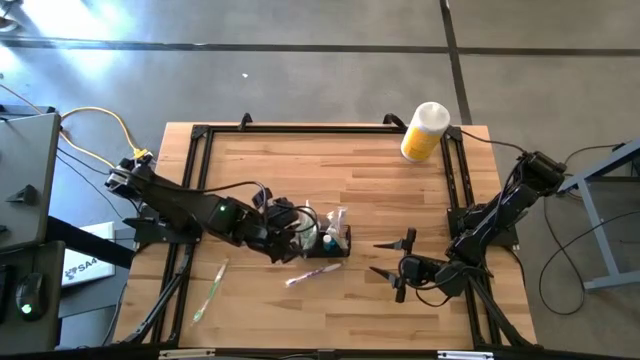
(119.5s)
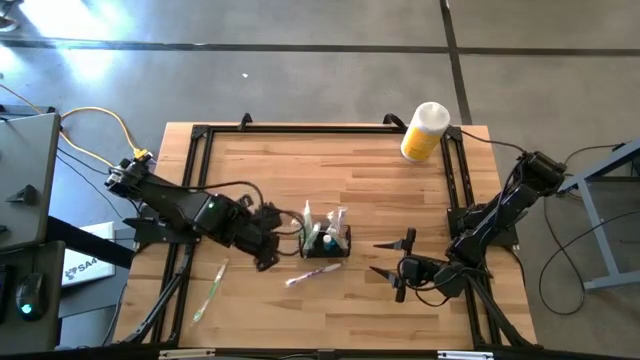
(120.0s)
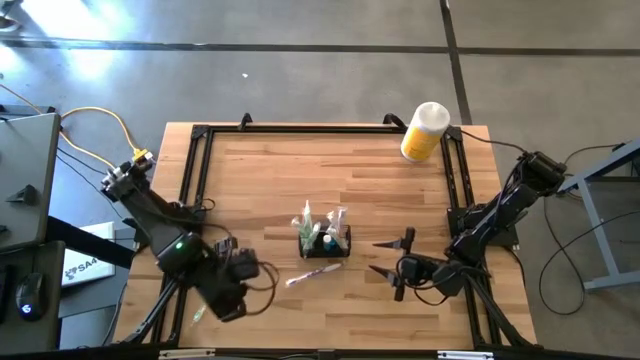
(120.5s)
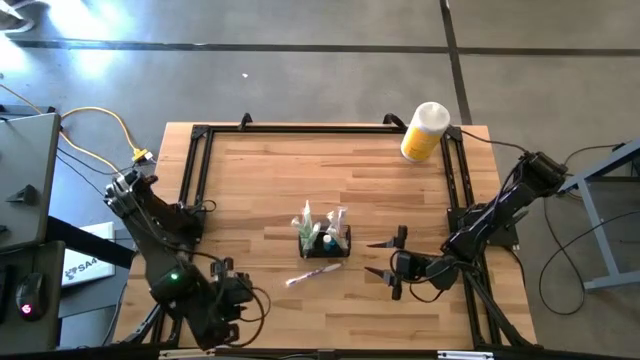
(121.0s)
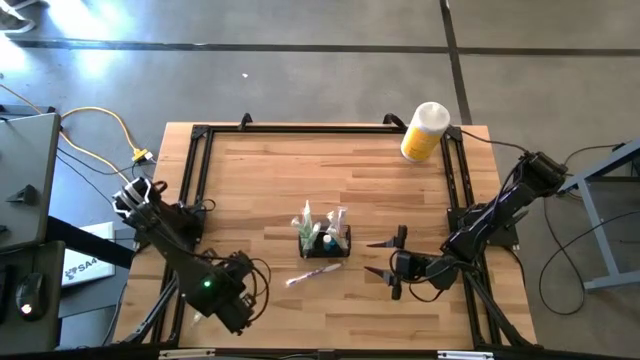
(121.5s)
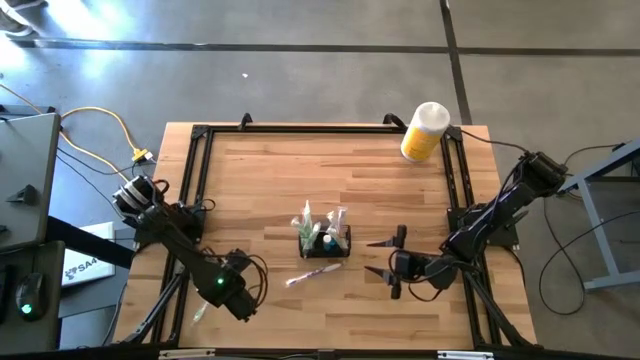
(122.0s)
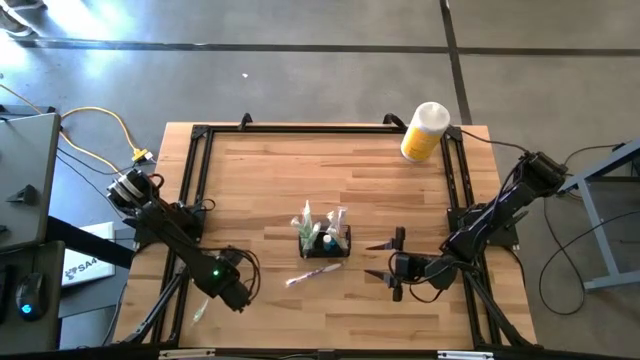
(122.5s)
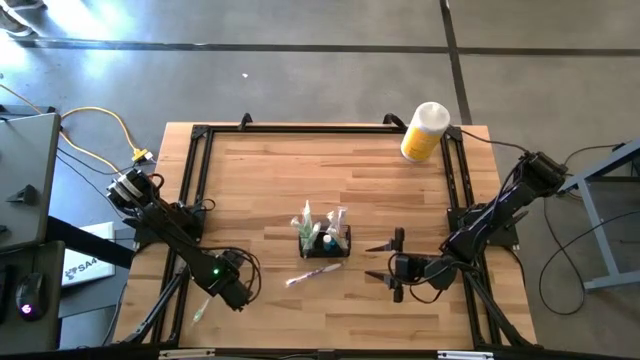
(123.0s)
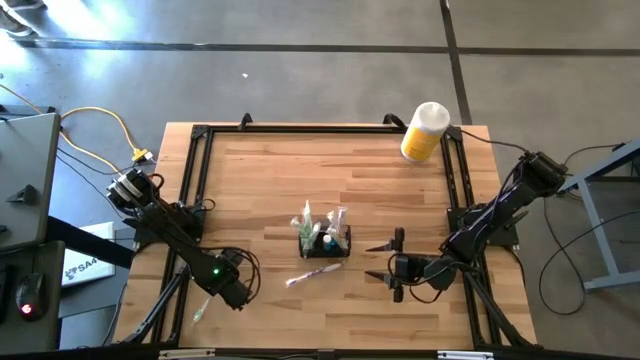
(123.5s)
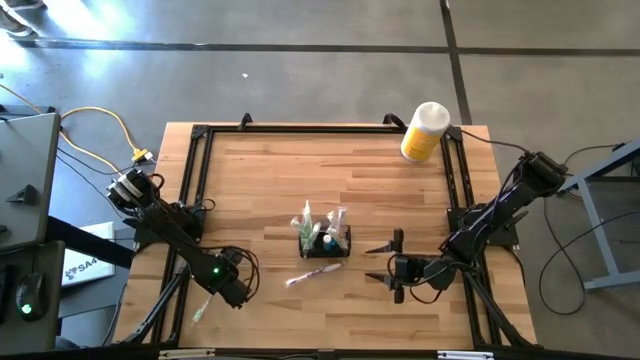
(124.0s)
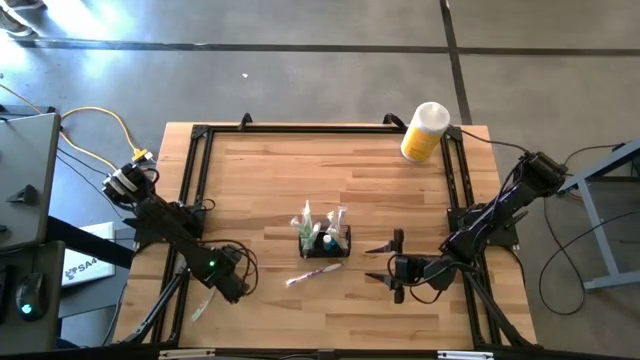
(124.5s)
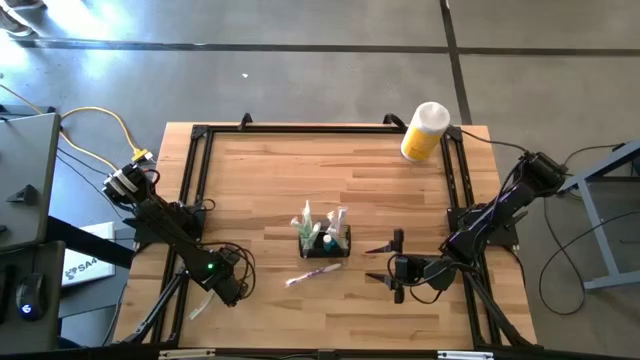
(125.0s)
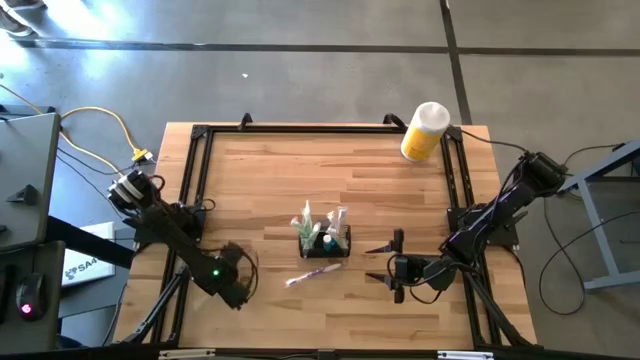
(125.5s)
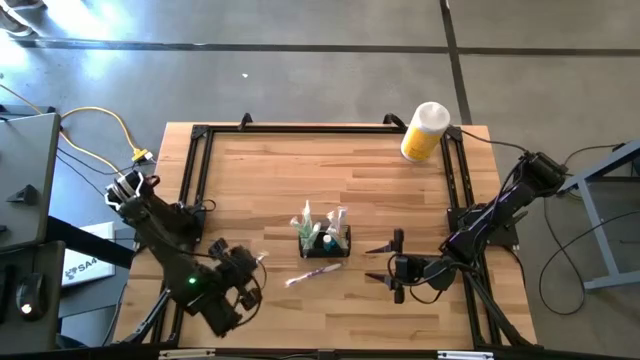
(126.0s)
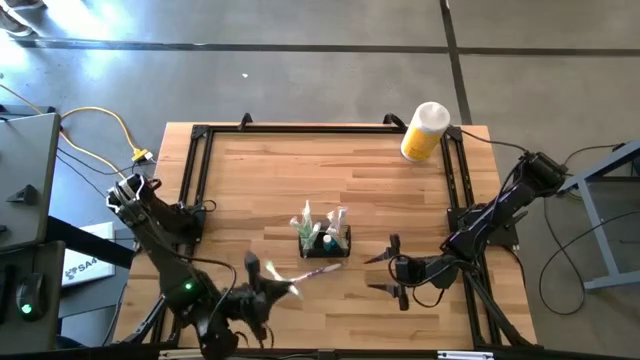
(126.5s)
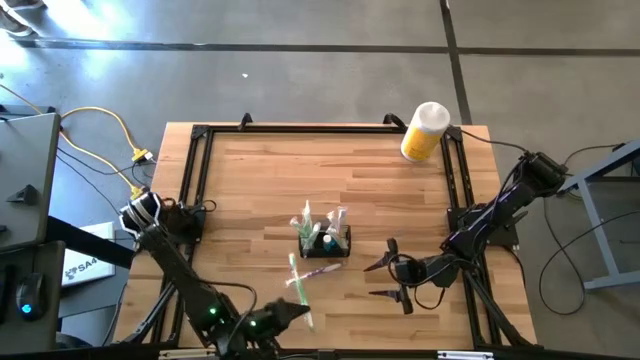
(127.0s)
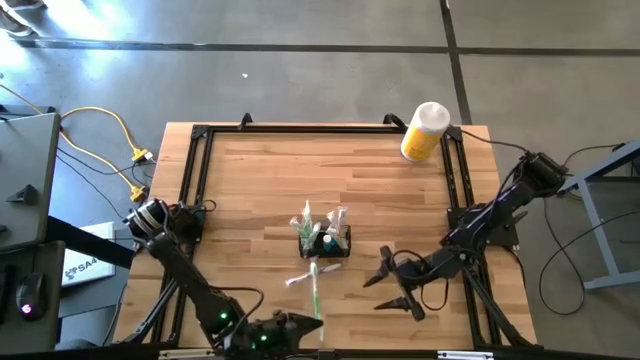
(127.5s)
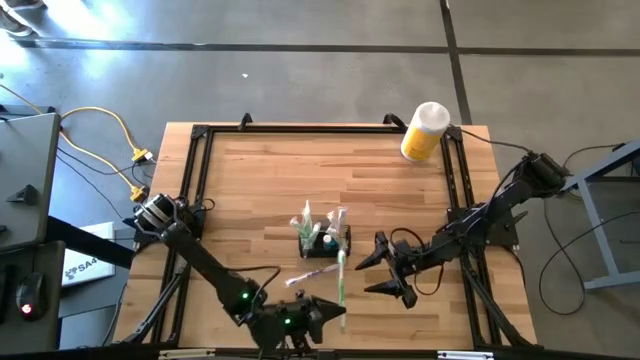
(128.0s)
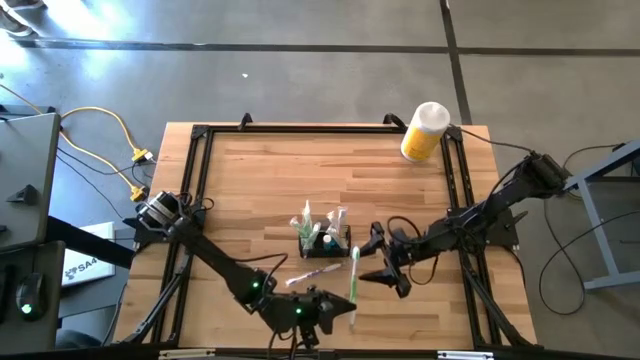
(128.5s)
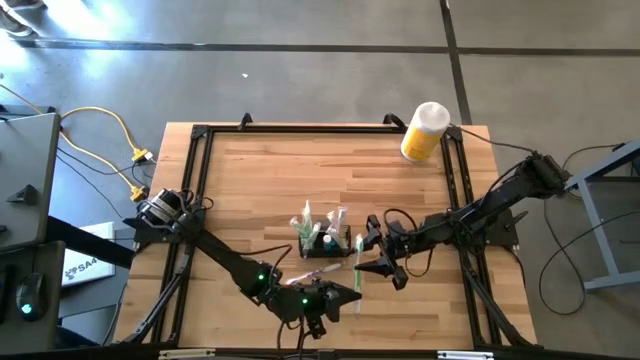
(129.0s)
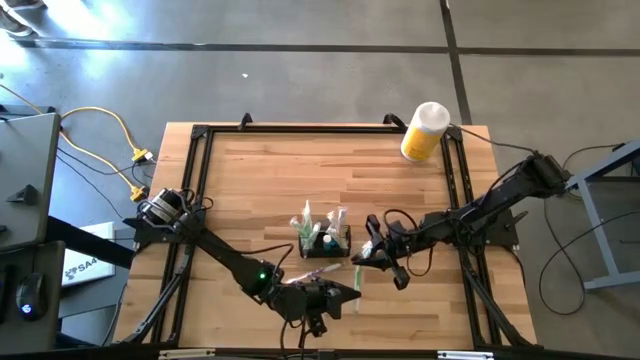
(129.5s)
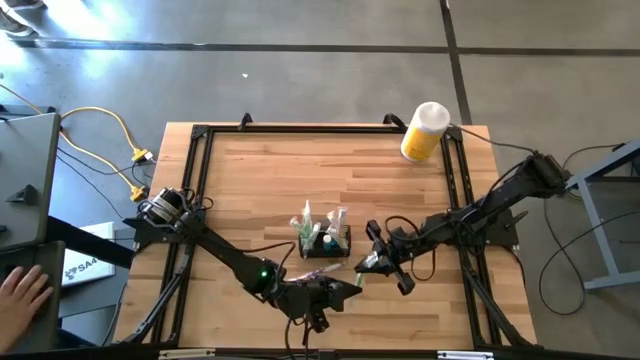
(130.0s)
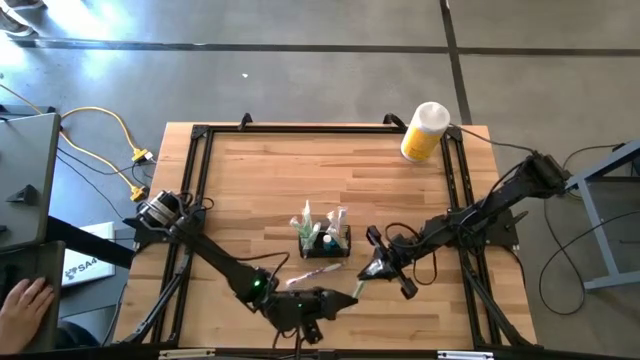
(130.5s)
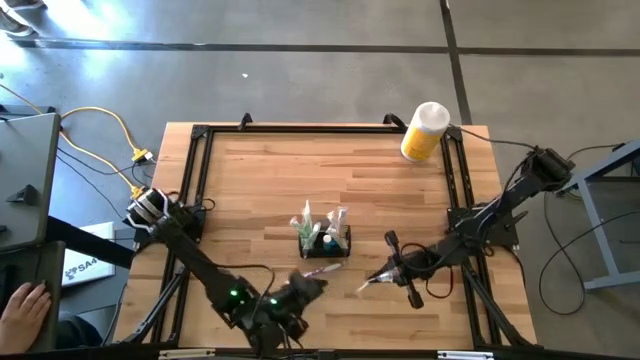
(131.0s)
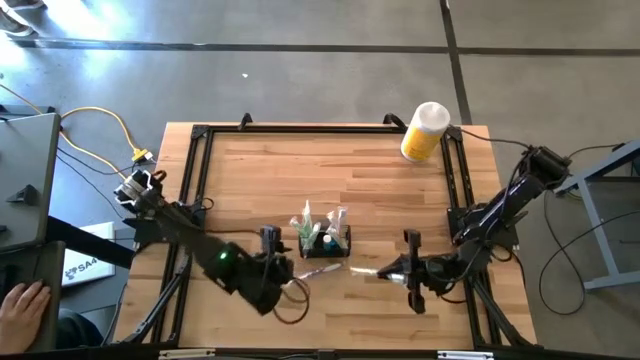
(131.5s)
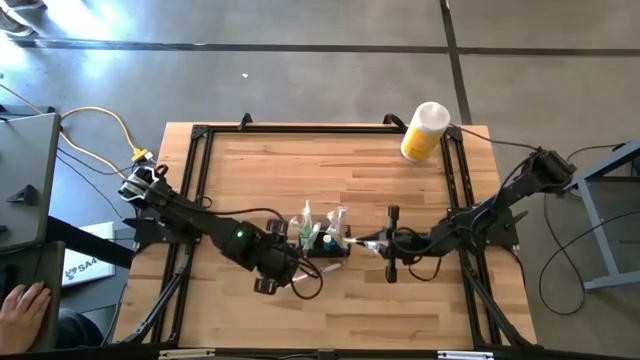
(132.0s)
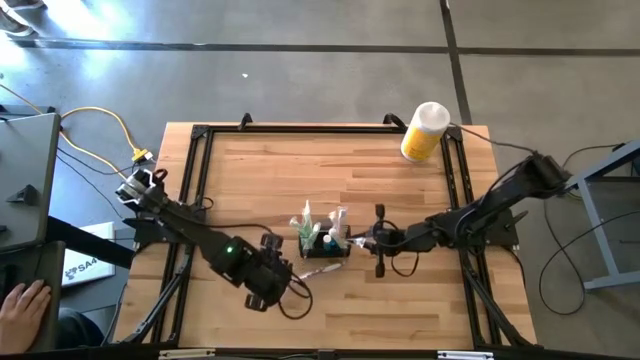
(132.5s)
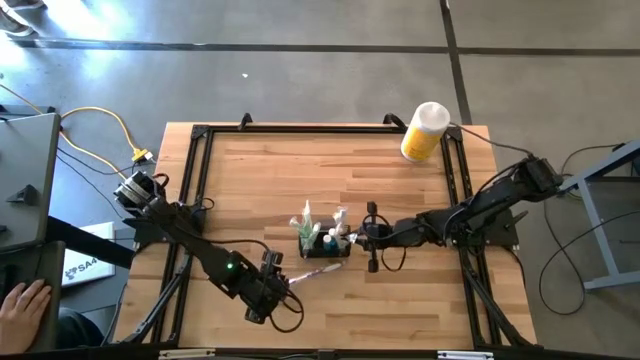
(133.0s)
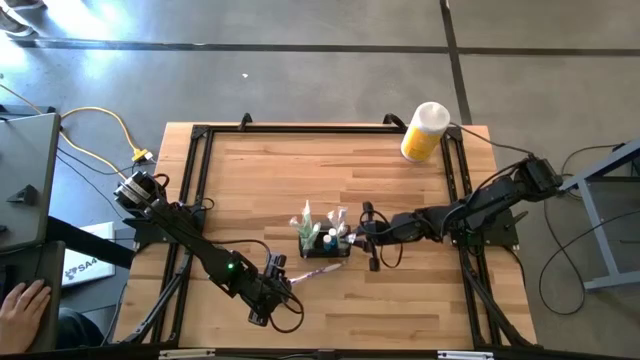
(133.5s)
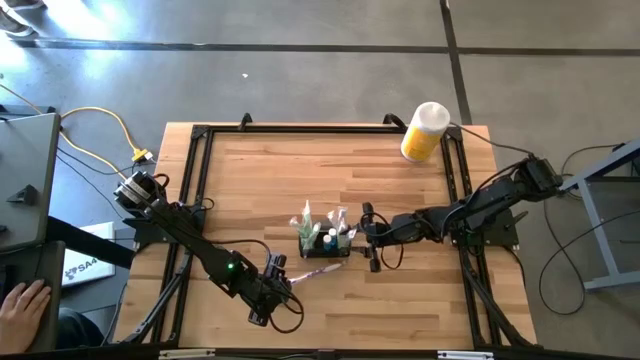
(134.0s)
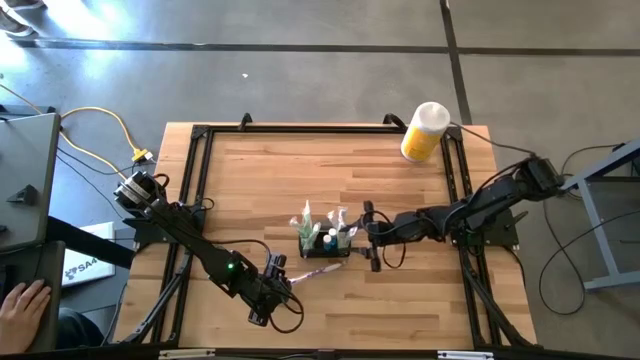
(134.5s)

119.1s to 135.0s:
Task: Pick & Place toothbrushing station
Put the green toothbrush into the black wire organizer
